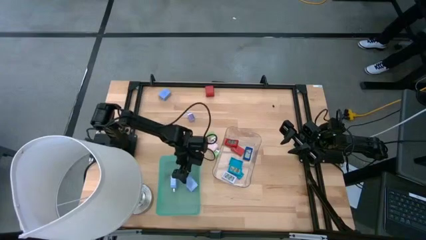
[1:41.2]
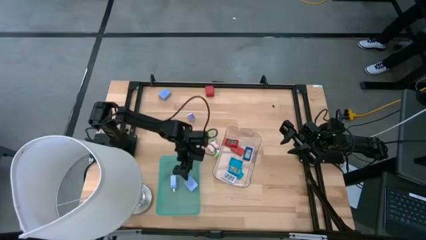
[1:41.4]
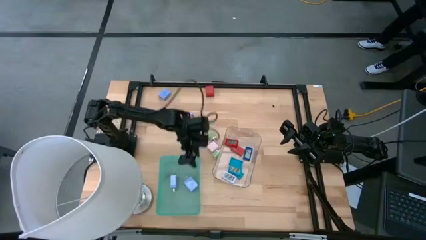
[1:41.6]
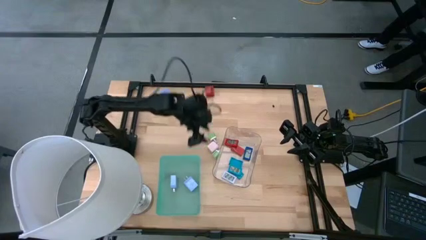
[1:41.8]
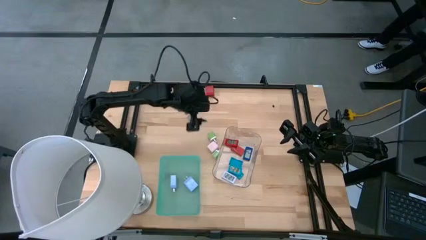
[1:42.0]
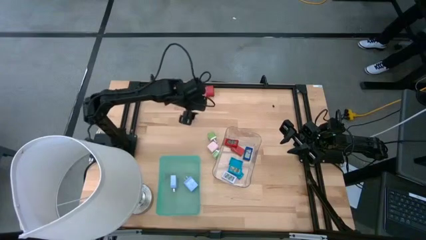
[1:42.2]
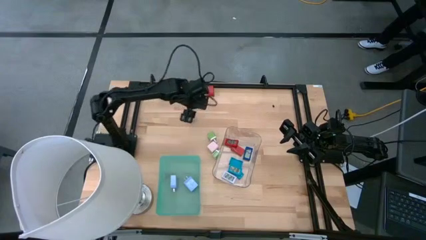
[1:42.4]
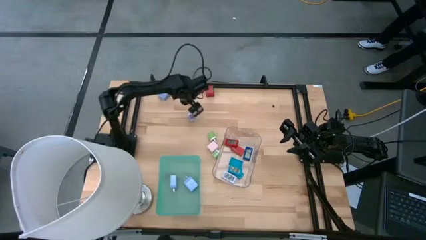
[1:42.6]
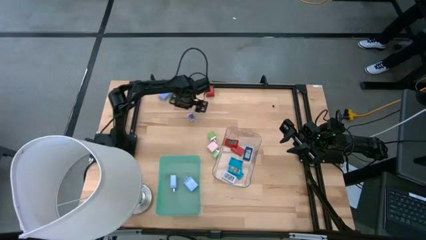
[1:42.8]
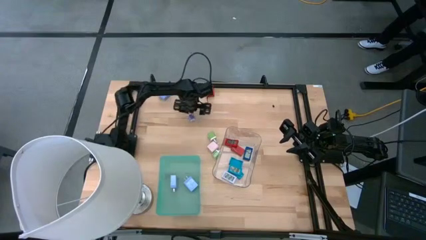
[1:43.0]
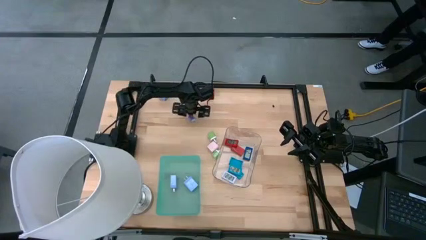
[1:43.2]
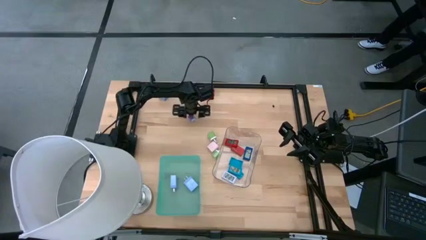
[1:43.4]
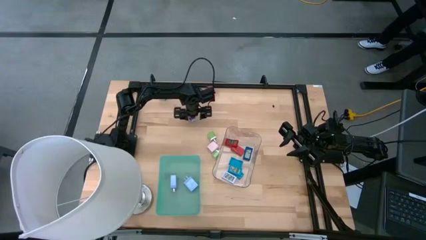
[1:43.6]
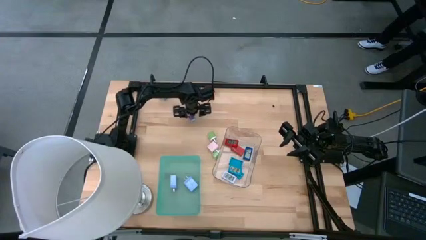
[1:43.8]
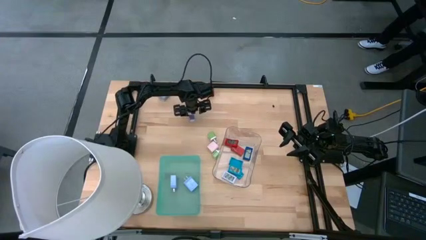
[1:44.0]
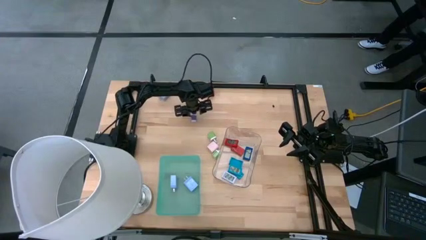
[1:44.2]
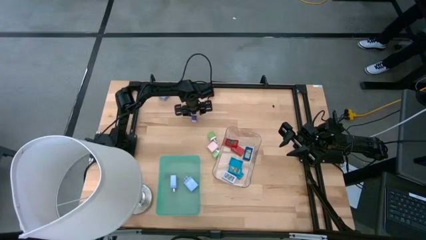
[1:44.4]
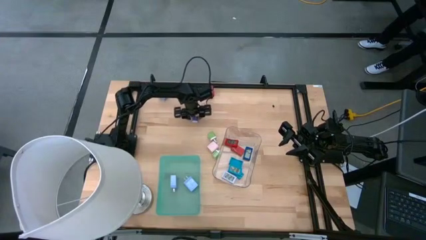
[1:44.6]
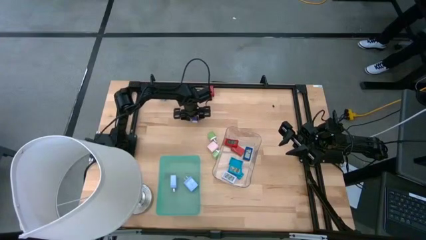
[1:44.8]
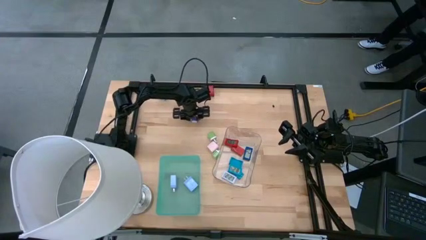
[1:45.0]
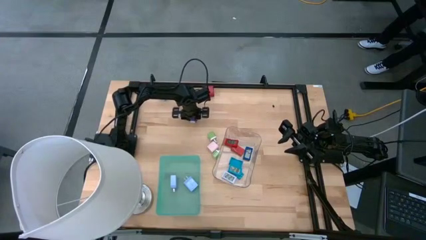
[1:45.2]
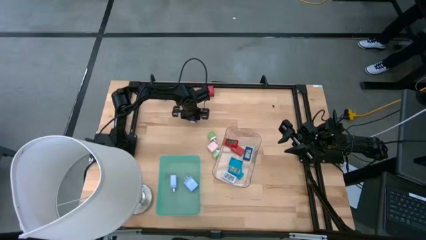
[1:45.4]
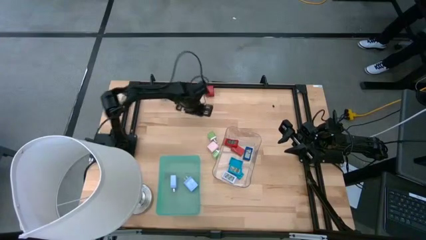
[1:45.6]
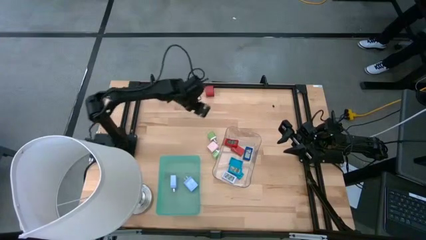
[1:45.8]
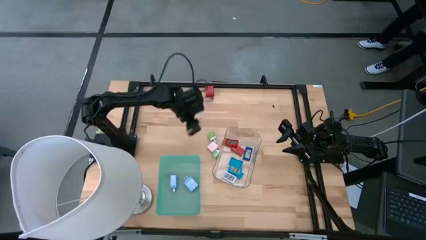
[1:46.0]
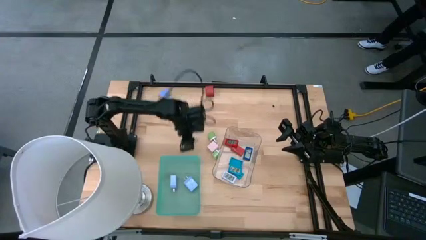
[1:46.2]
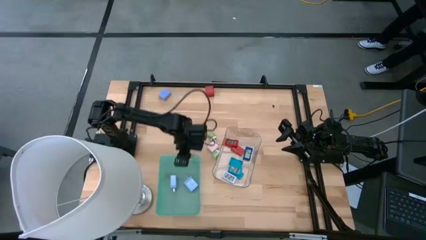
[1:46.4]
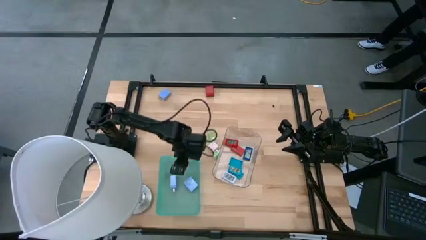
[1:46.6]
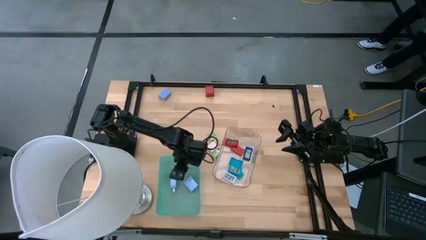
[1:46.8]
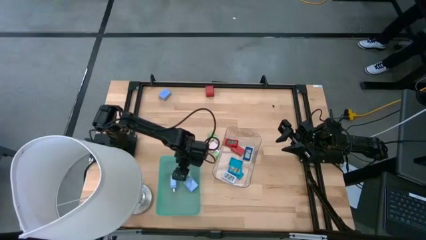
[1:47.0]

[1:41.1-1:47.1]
Task: Pick & Place Office items
Put the dark blue charger adapter into the green bin

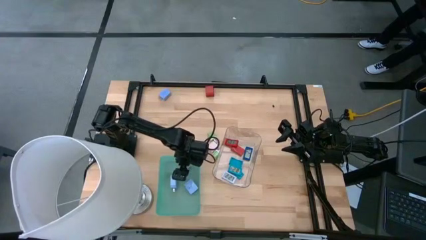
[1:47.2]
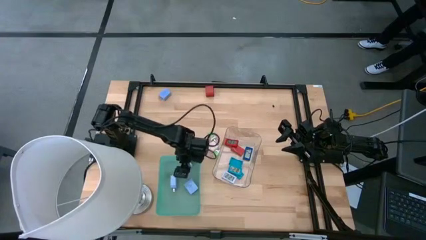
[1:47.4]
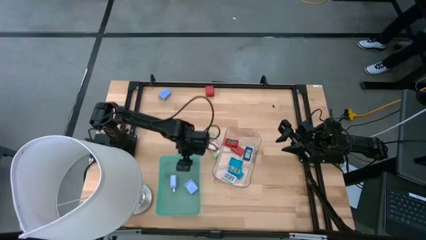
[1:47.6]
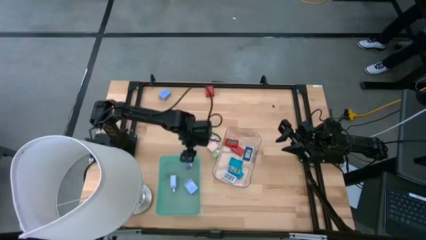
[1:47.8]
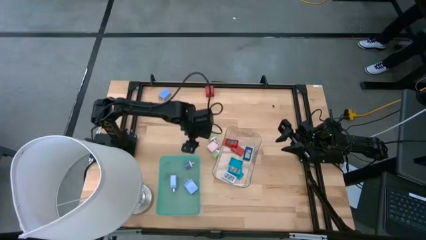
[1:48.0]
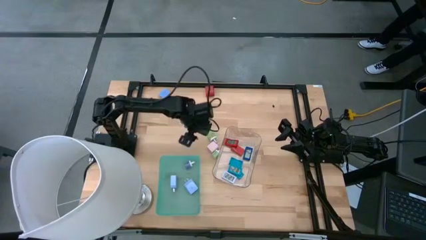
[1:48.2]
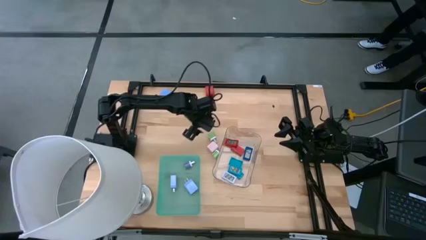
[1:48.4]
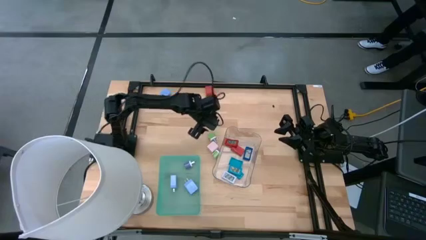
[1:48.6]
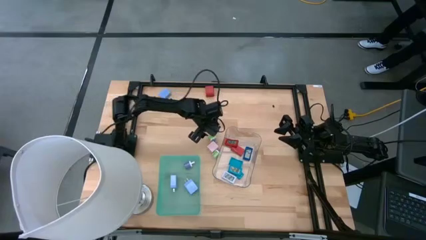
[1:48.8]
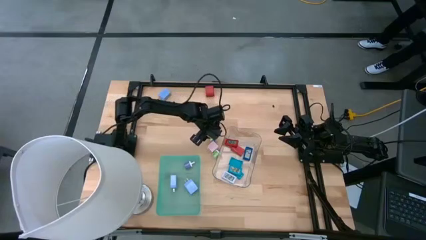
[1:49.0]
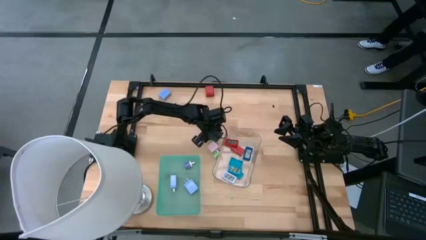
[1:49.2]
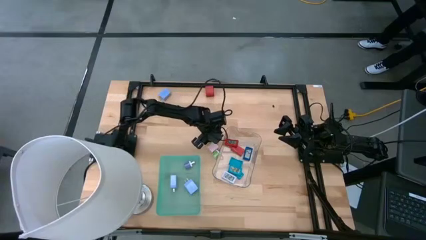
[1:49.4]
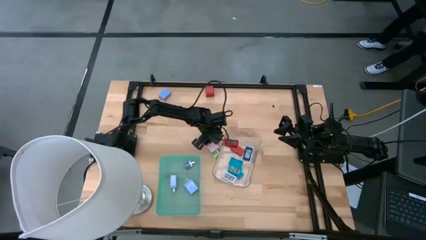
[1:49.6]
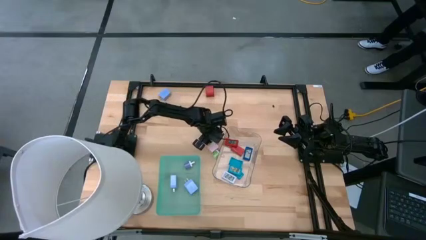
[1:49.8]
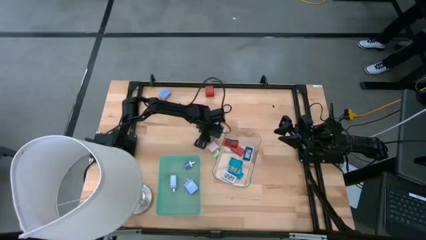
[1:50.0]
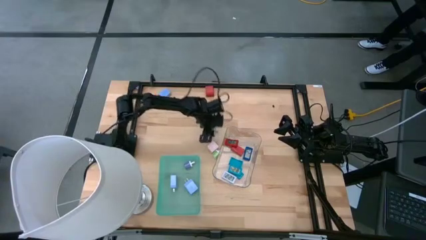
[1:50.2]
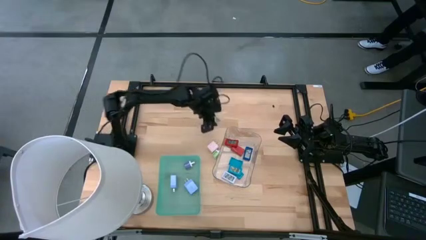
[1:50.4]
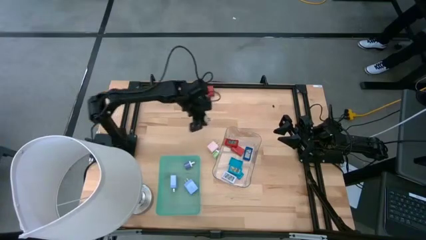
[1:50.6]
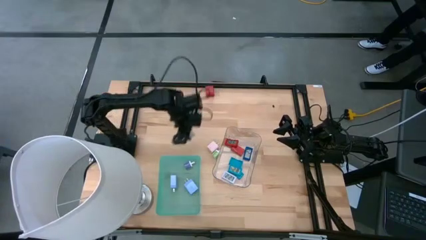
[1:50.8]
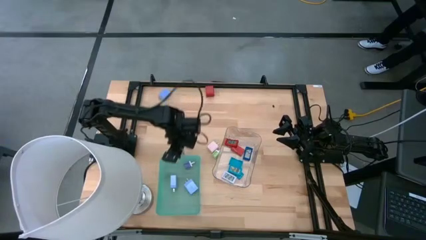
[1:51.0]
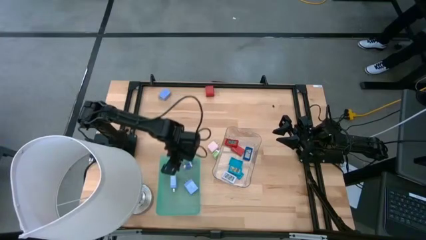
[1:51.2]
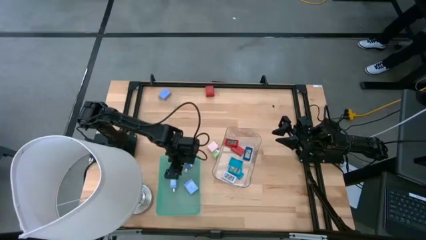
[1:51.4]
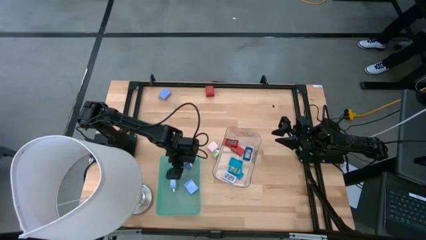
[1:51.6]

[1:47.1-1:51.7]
Put the top green charger adapter into the green bin

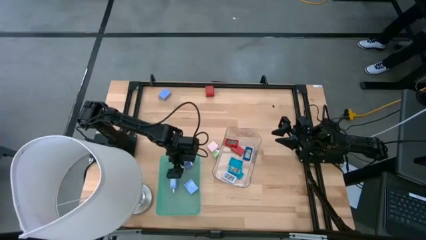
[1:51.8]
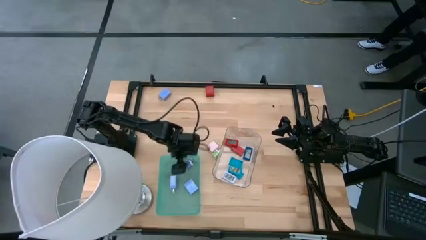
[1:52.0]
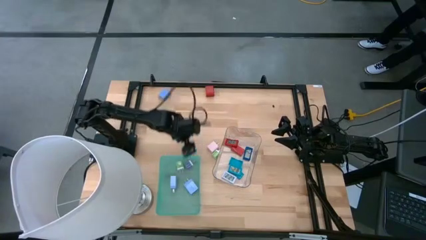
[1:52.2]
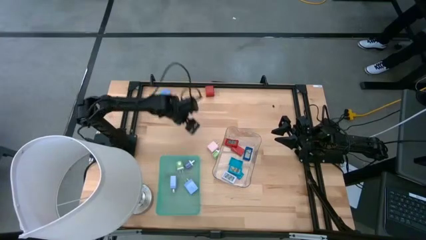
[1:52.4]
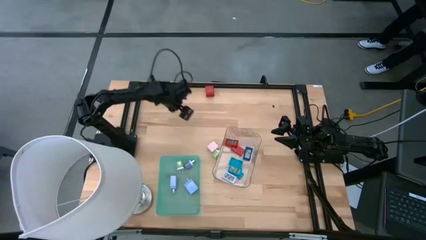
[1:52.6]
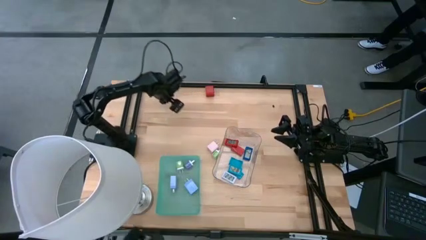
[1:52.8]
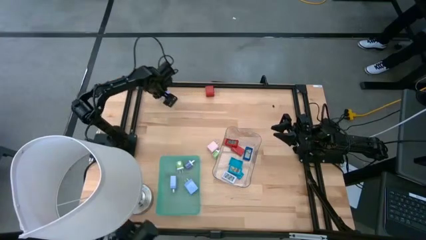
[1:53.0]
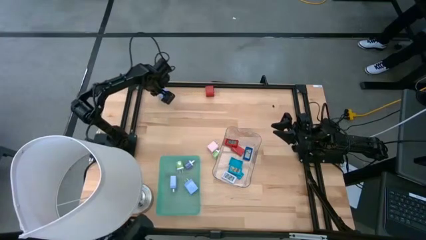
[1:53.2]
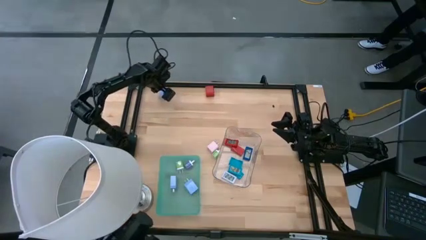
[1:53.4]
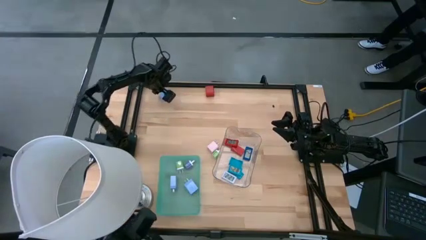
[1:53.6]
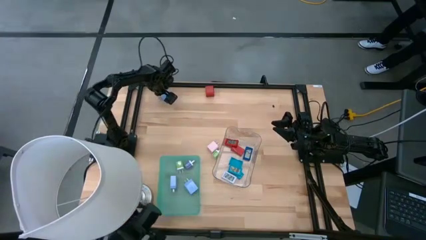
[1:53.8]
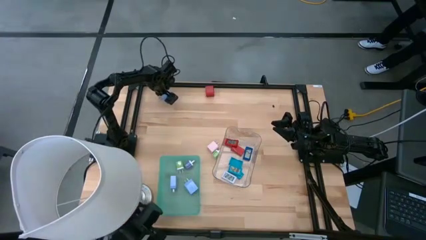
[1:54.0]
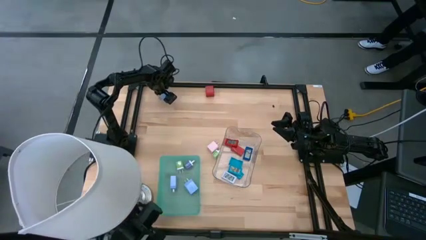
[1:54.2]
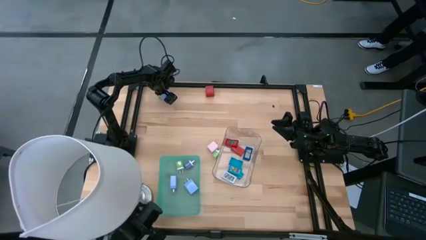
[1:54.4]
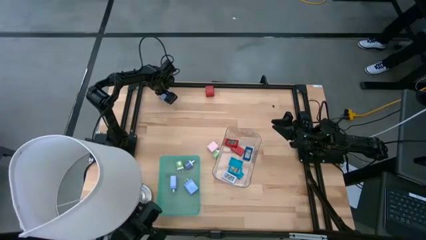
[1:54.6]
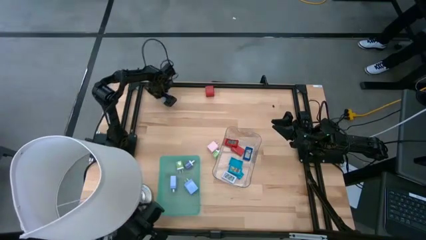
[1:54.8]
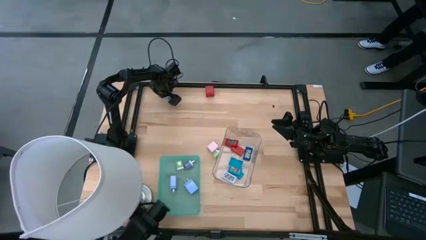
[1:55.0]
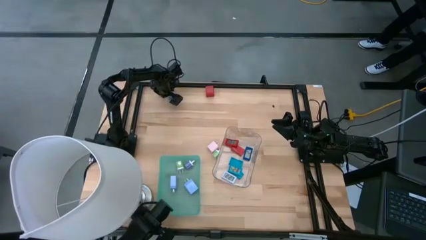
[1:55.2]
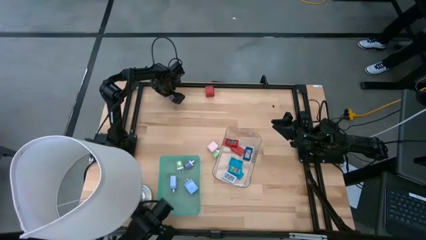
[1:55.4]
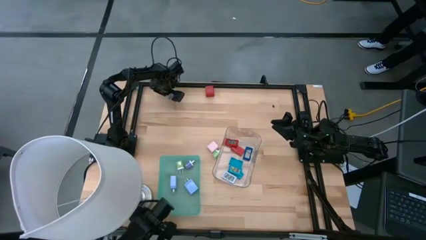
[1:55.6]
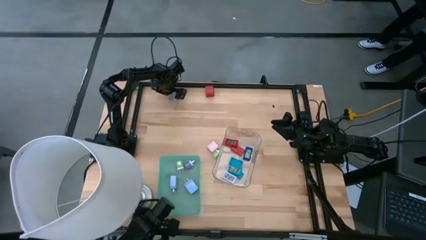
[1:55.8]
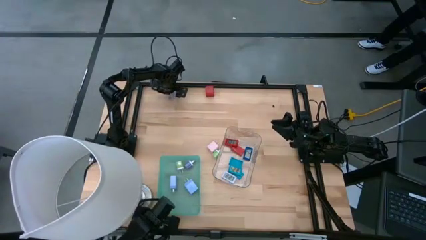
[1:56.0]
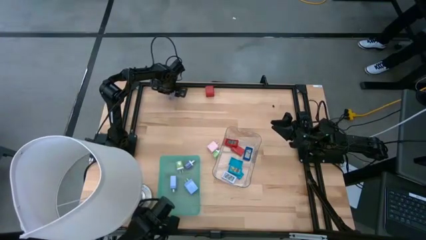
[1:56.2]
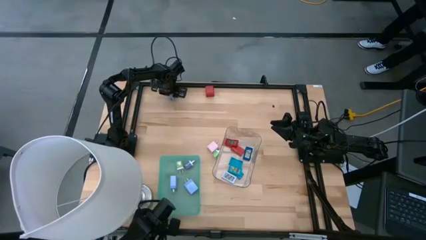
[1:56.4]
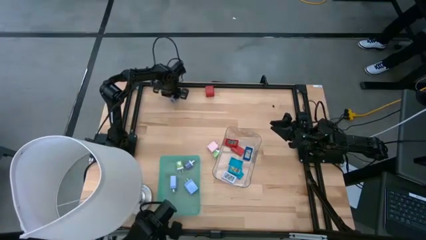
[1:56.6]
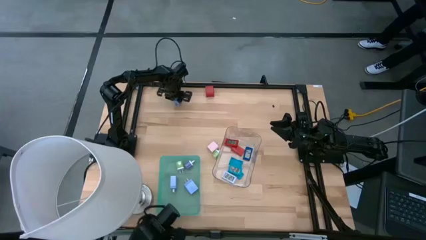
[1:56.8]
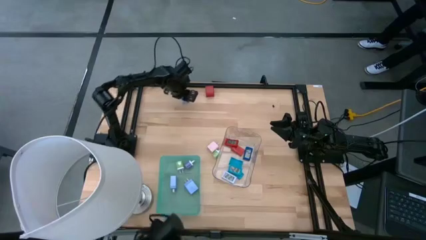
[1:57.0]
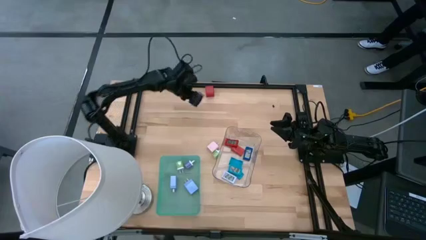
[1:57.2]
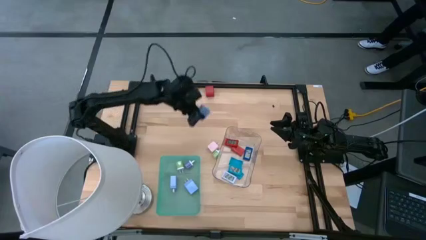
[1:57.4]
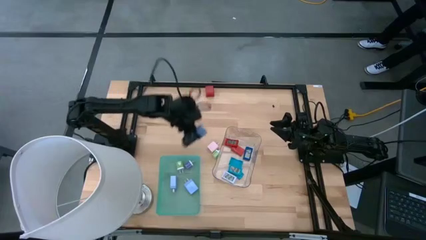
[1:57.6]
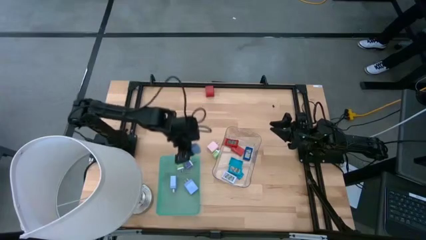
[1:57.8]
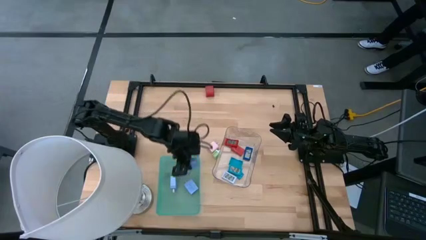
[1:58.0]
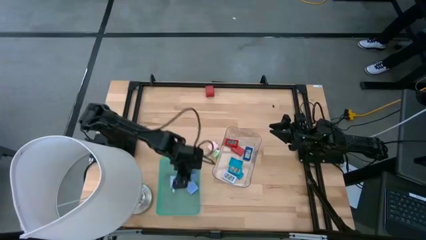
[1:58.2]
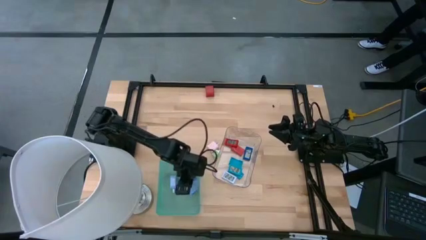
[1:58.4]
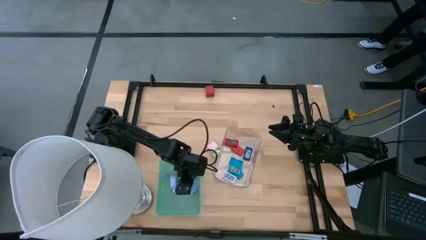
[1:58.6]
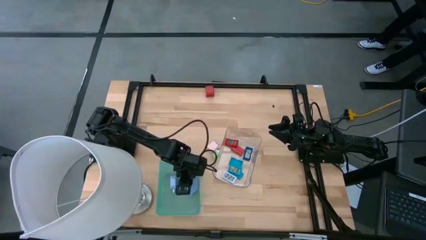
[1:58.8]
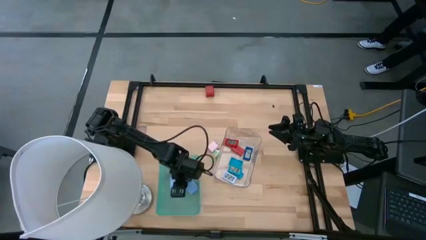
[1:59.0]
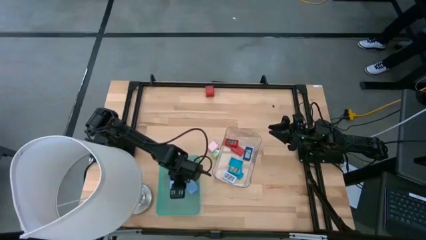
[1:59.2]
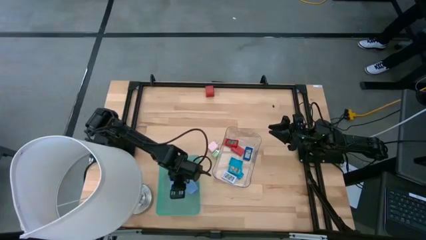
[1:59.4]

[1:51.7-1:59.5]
Put the blue charger adapter into the green bin
